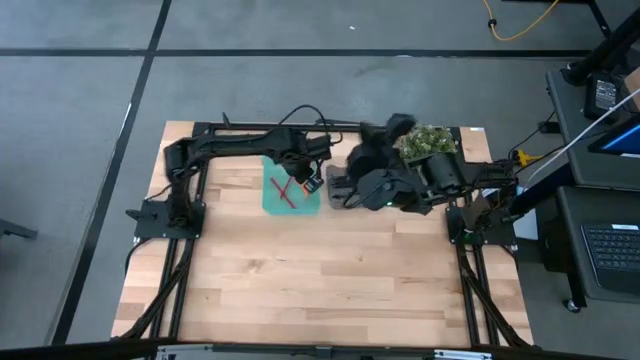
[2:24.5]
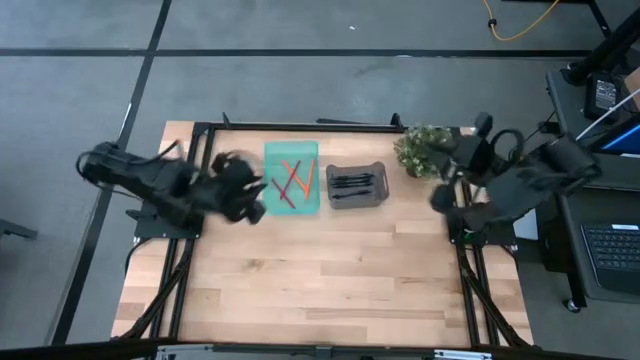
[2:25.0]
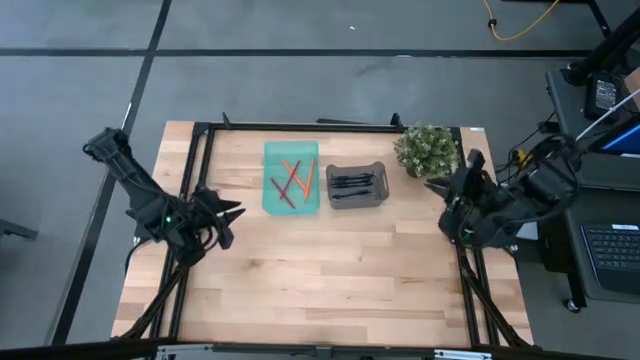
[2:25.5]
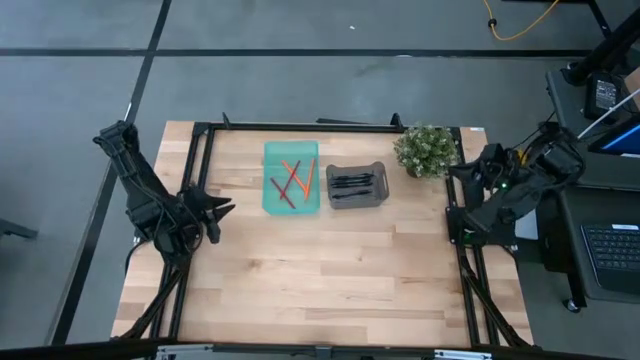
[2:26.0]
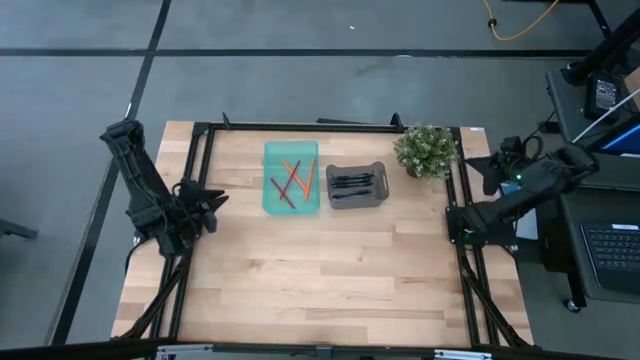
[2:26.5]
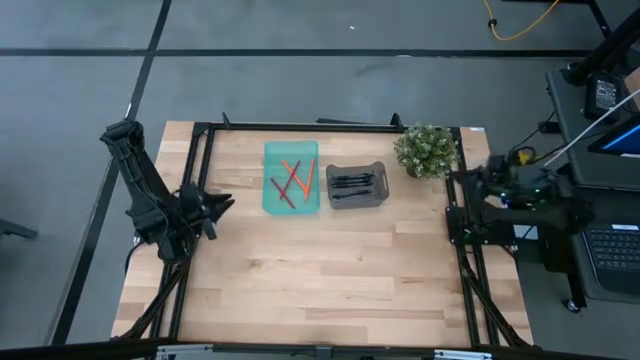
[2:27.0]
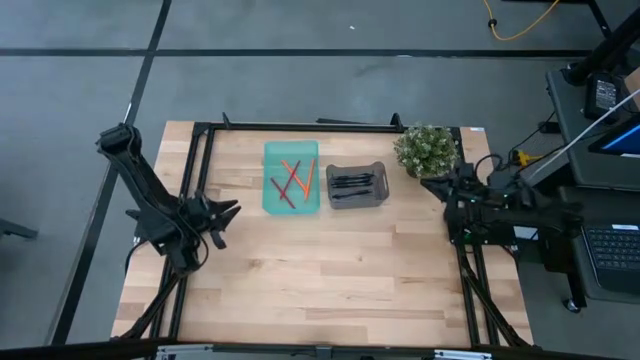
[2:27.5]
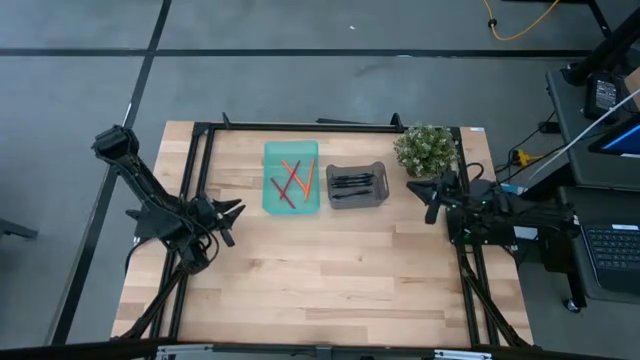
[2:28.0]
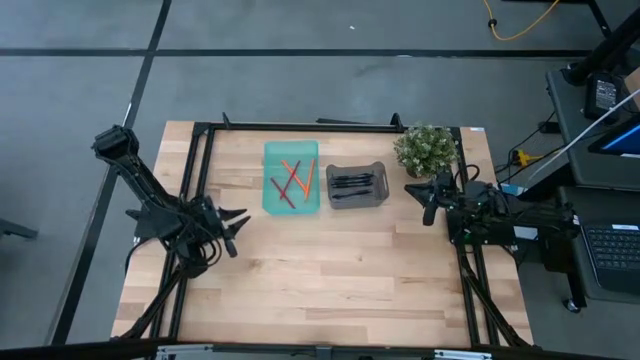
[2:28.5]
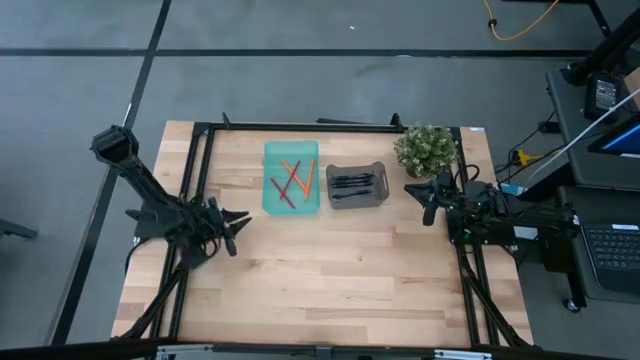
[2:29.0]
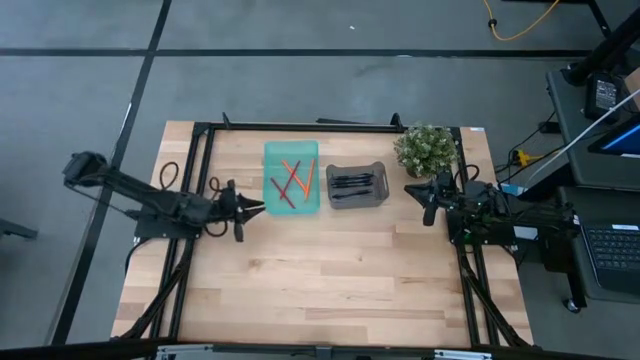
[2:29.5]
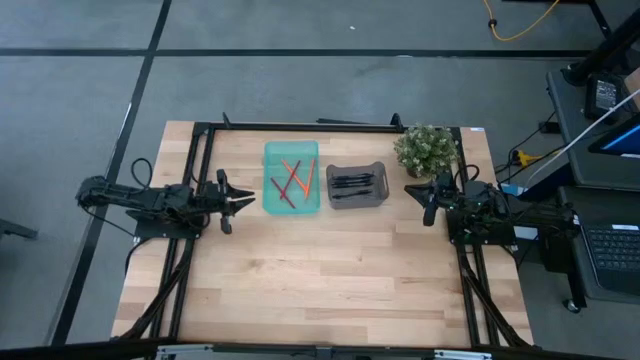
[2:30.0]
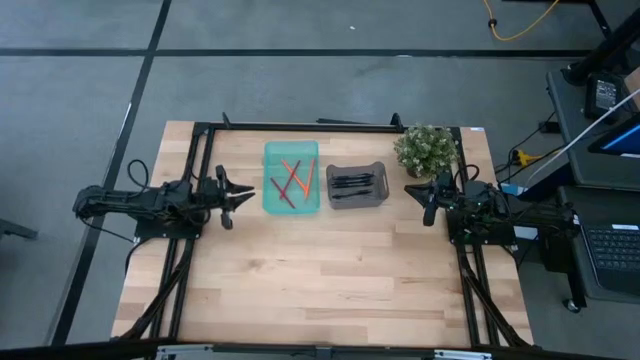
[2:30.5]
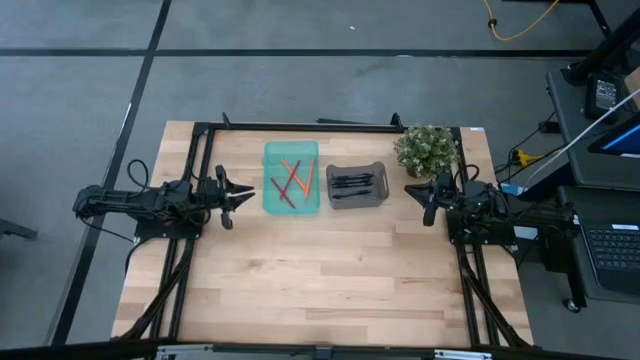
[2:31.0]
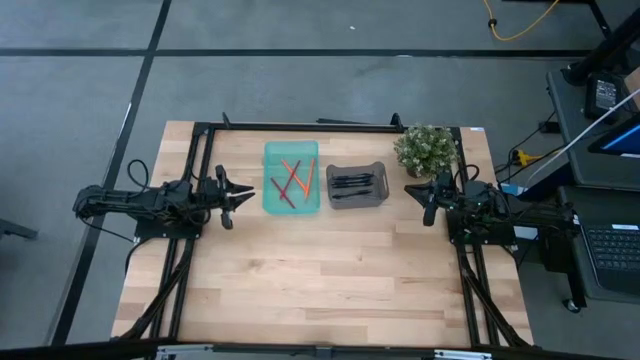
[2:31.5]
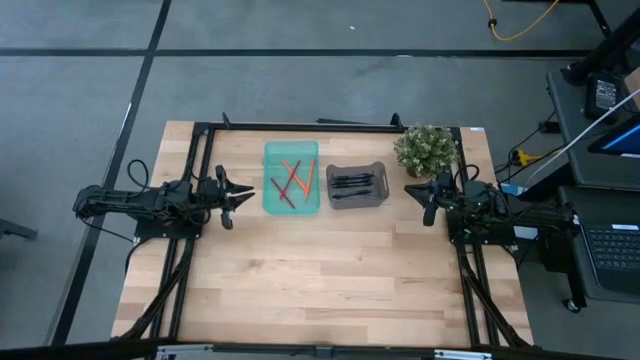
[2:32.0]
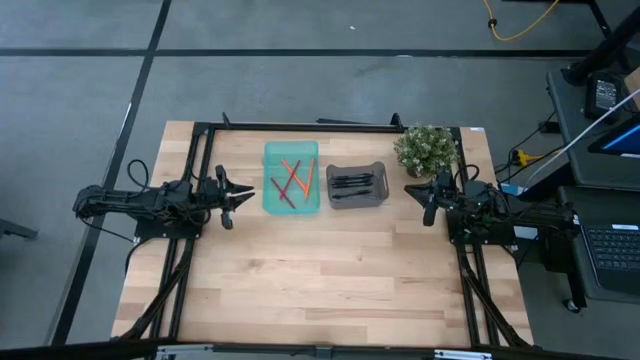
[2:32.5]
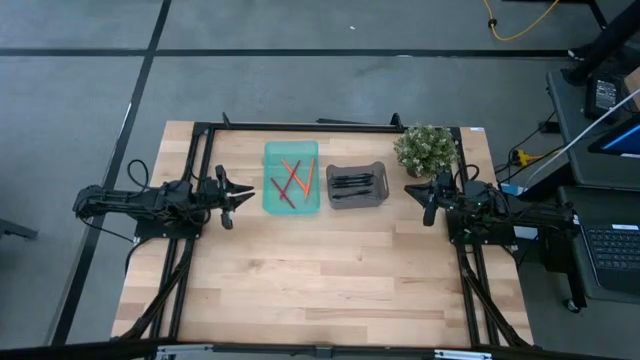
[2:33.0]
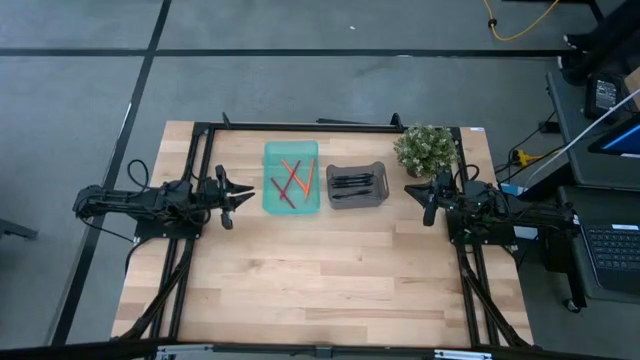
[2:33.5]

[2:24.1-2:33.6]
Task: Sort pens & pencils
Return to Home Position

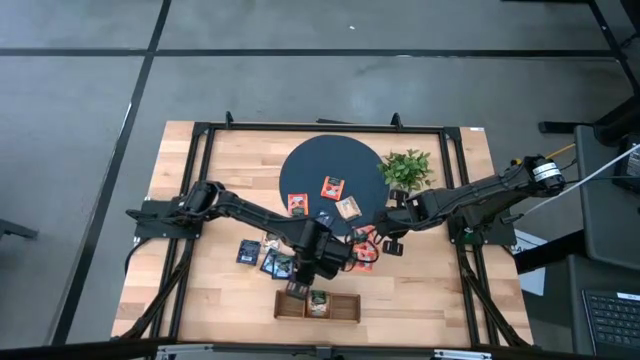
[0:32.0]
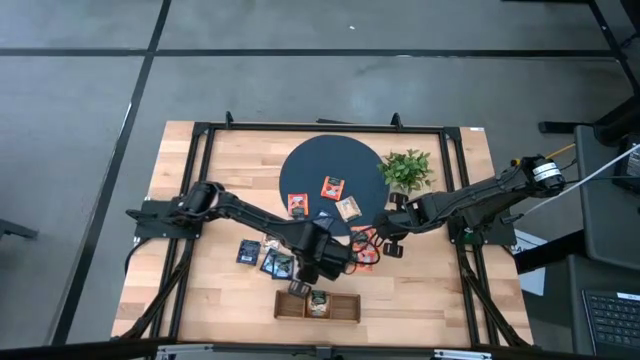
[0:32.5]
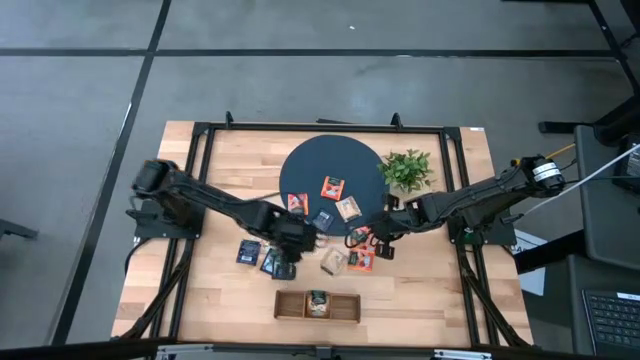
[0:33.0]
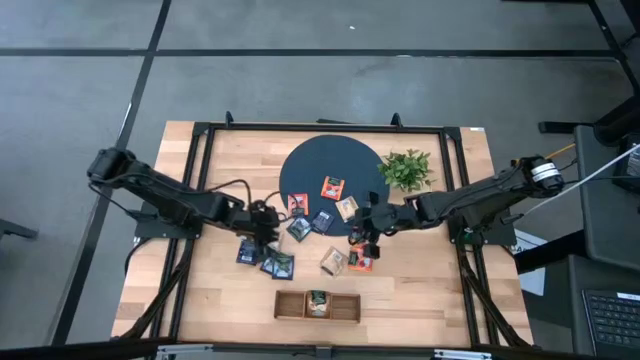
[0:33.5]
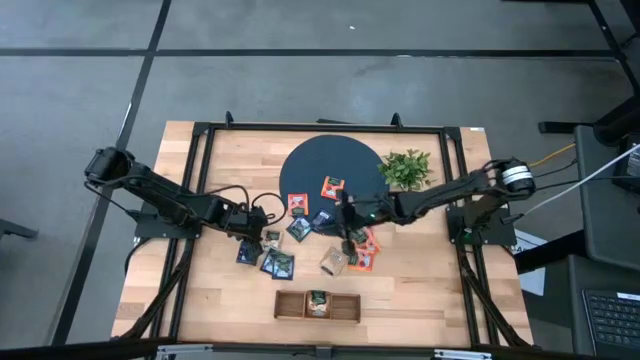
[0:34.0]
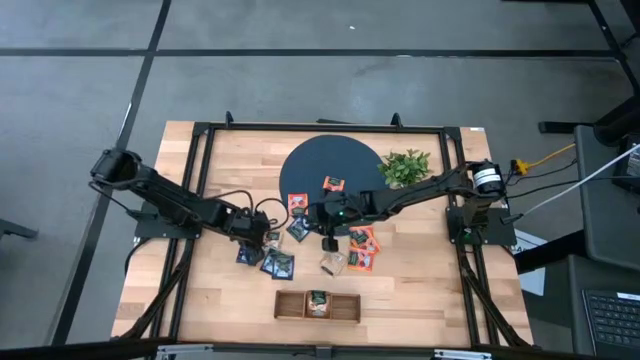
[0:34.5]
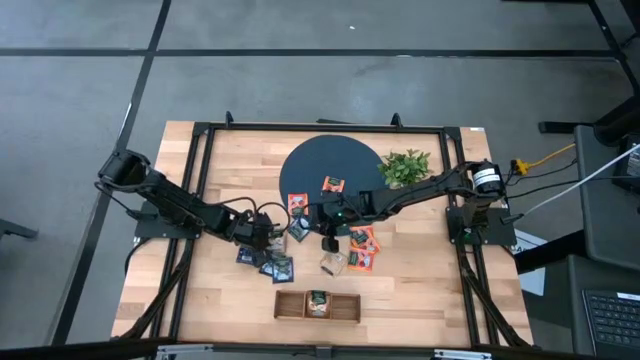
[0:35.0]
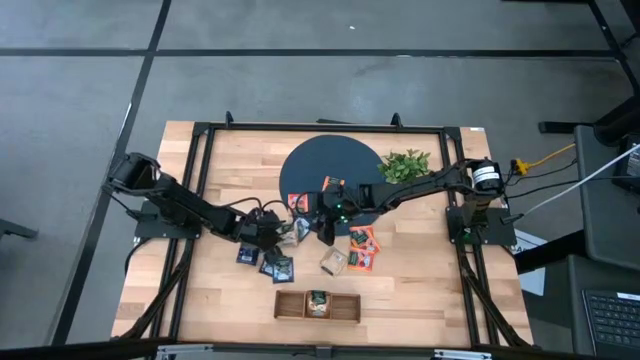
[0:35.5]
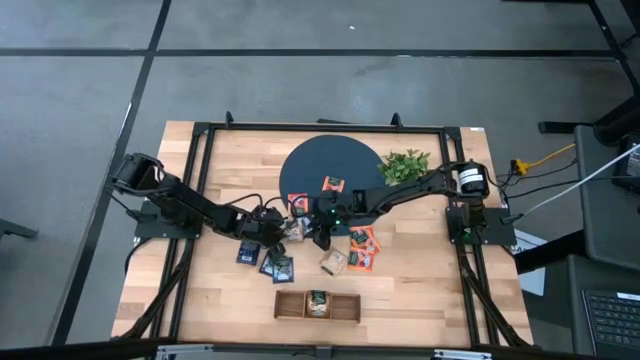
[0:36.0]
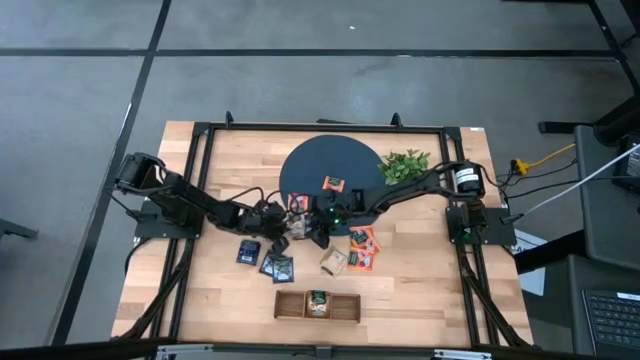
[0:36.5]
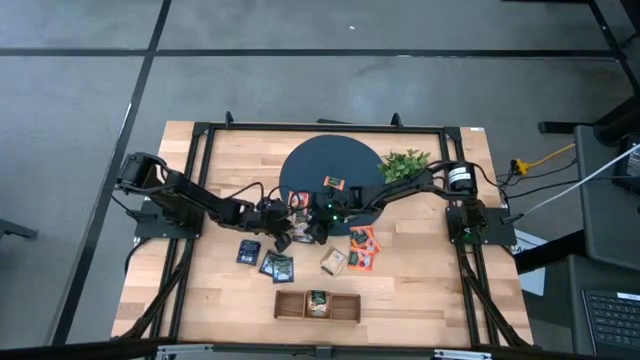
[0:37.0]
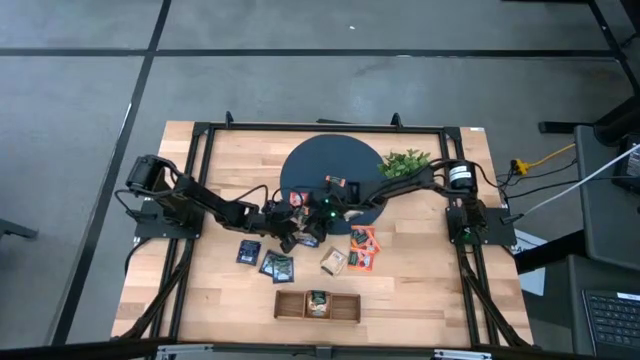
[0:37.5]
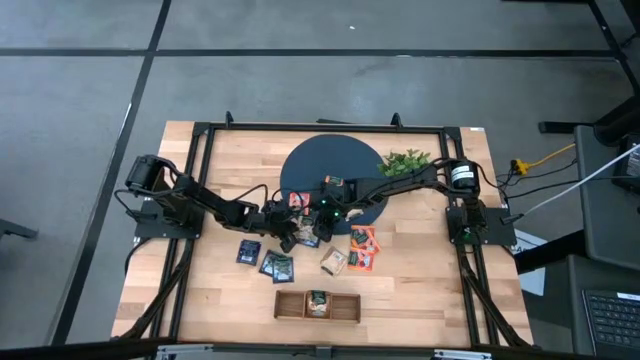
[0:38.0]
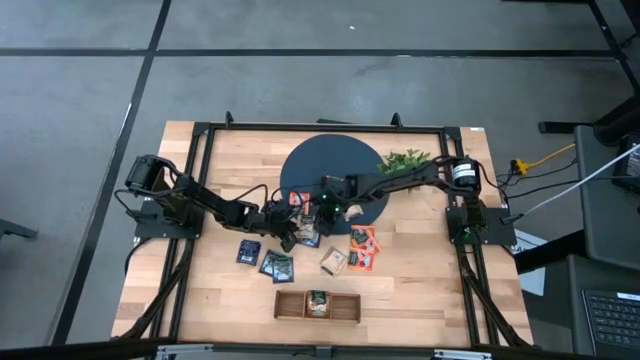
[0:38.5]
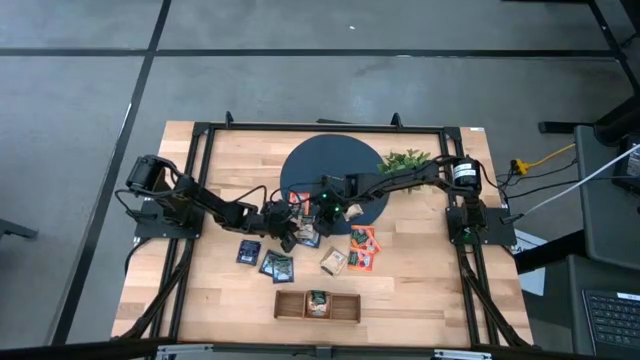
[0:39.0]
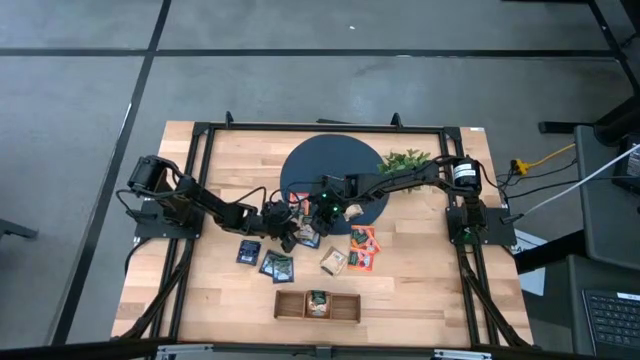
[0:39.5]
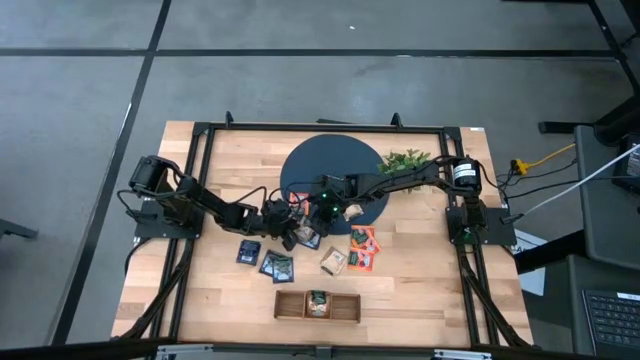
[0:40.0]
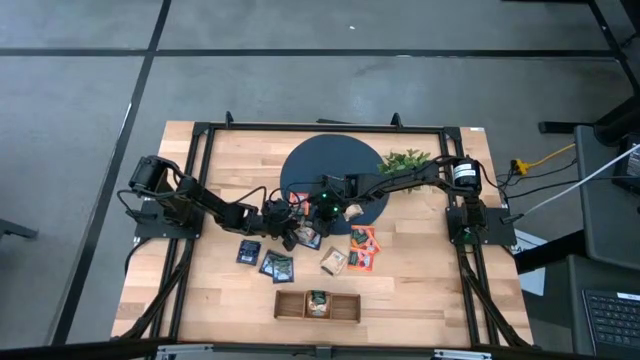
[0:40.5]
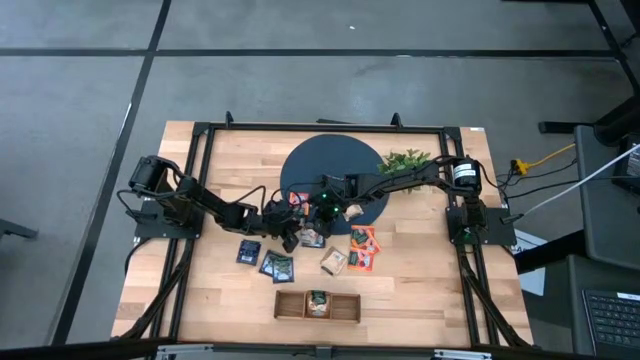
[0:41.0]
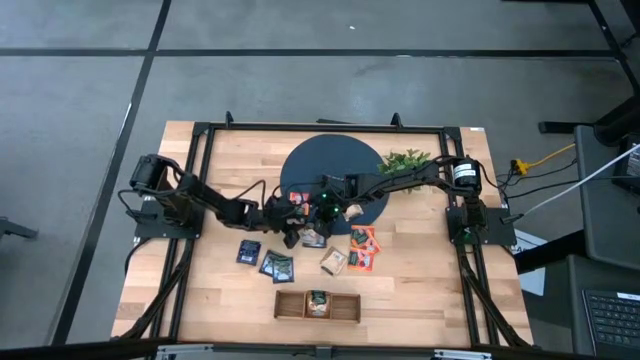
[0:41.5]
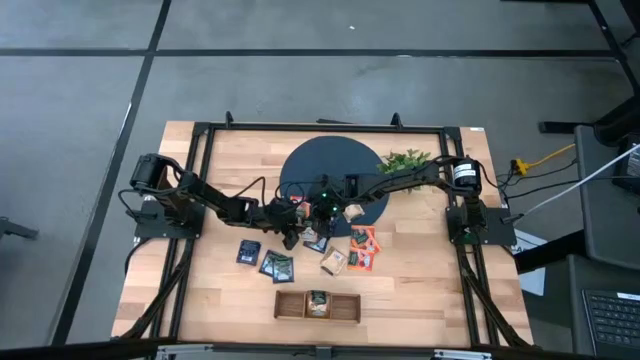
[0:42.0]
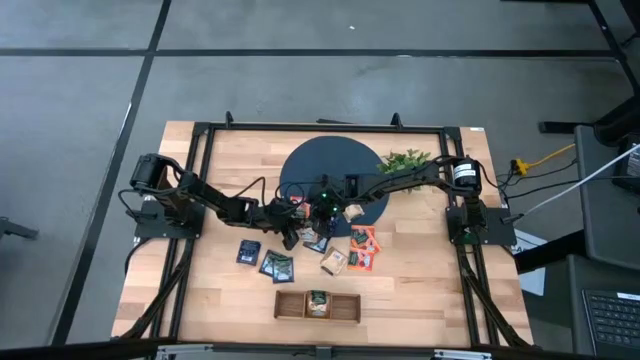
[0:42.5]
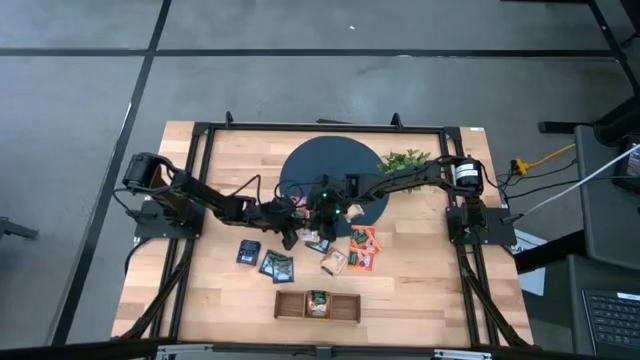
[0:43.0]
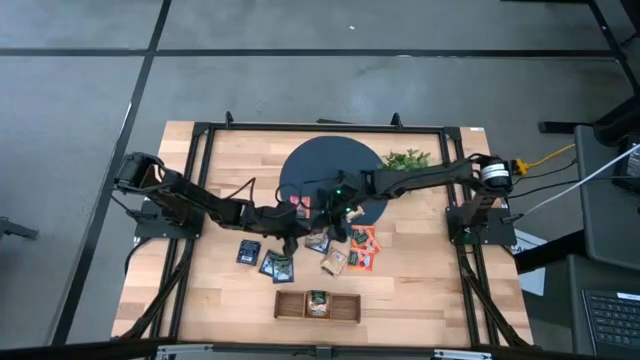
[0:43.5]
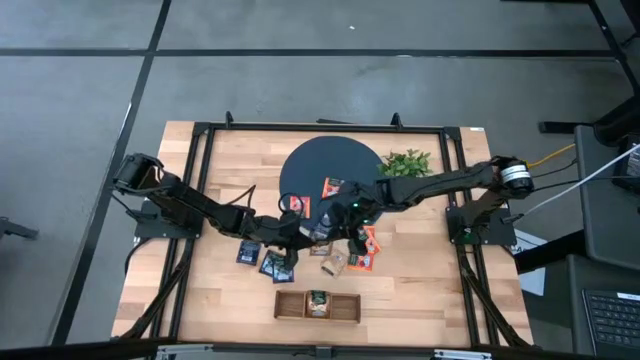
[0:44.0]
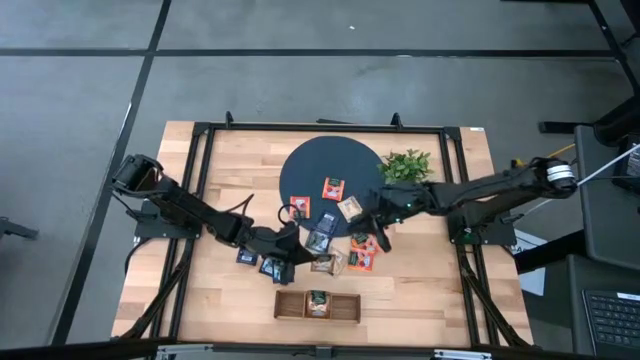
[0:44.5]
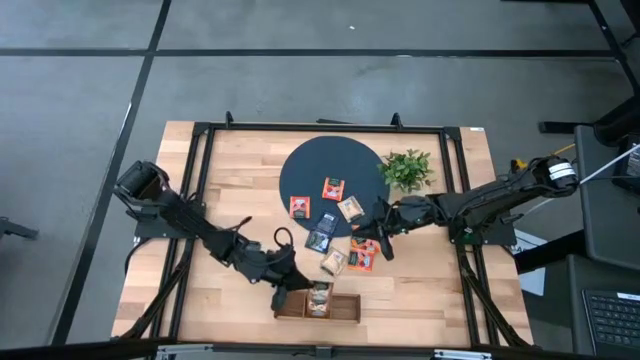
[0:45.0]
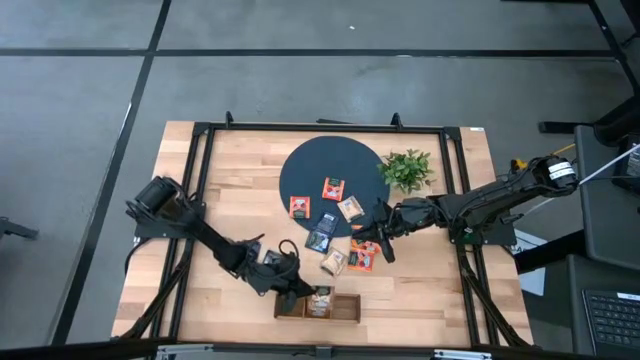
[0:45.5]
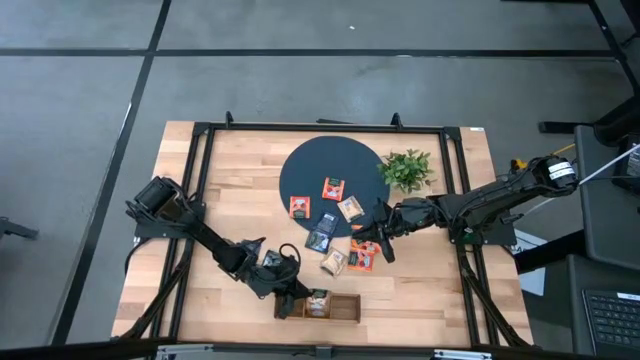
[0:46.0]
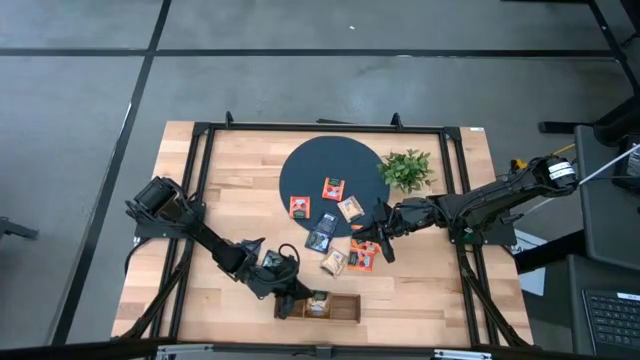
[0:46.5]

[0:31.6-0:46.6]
Task: Pick & Place Tea
Put the brown tea bag into the middle section of the wooden organizer
